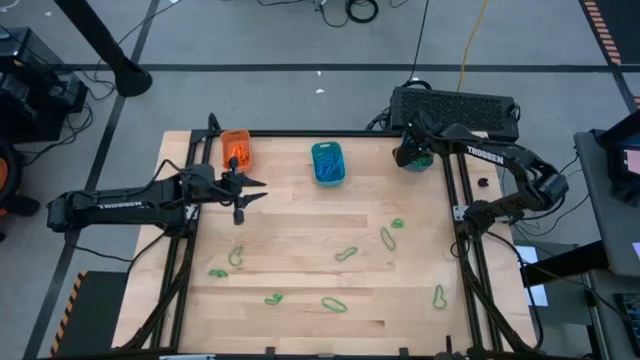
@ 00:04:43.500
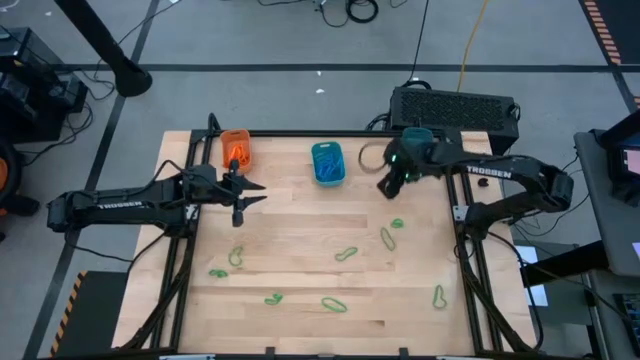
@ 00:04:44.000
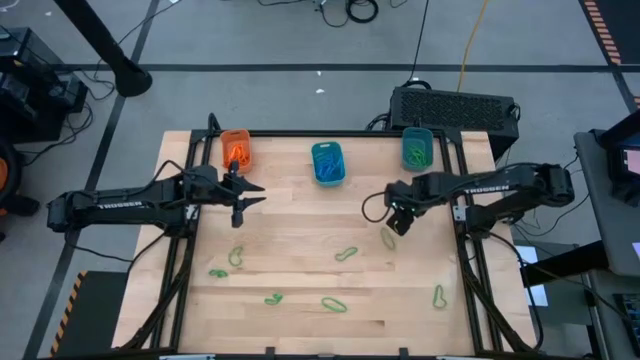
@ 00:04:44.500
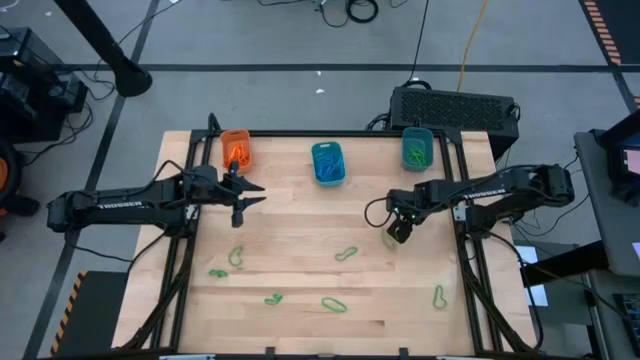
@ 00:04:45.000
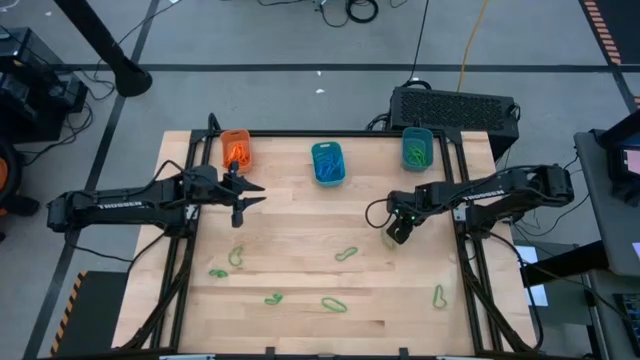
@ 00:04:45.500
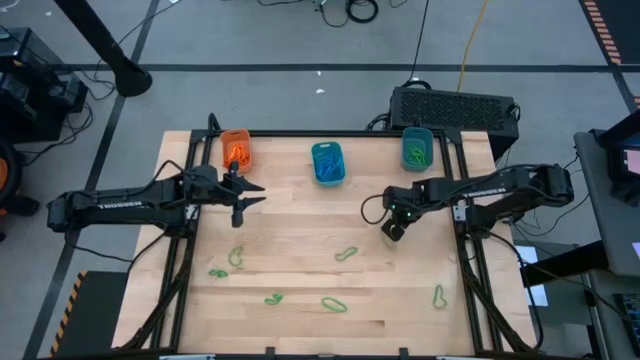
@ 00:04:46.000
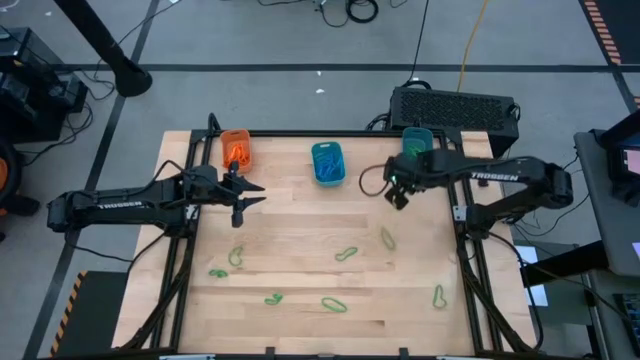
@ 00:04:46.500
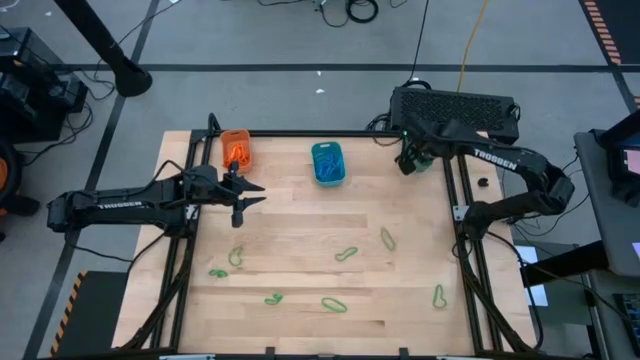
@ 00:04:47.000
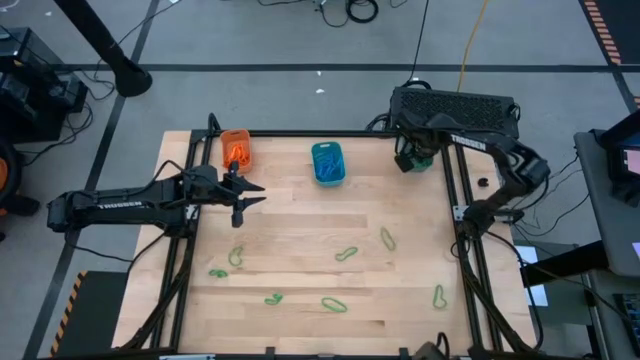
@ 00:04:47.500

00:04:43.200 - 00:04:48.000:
Task: Sort rubber bands into baskets
Put the green rubber band into the dark blue bin

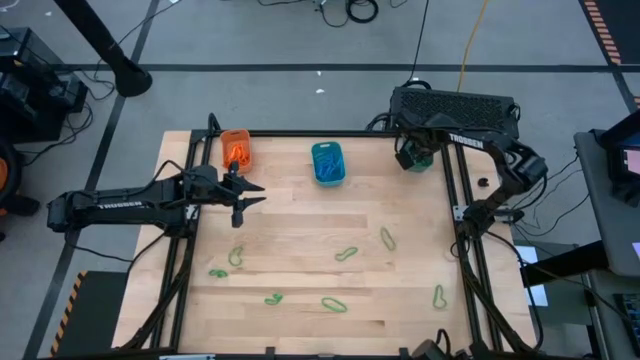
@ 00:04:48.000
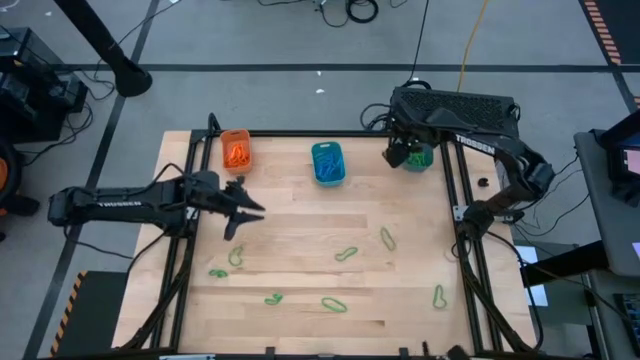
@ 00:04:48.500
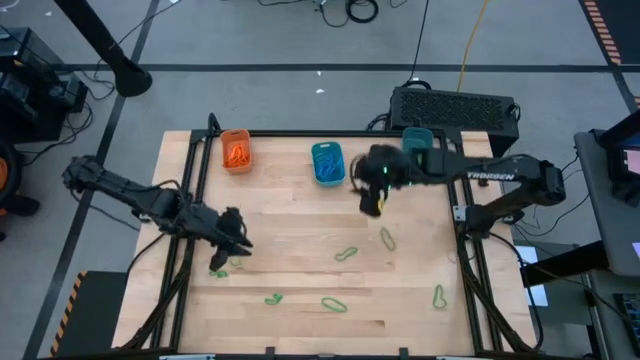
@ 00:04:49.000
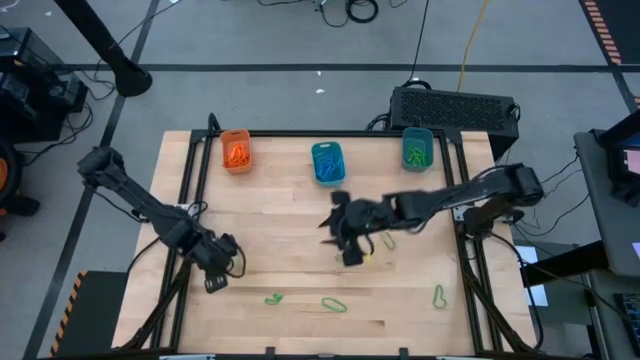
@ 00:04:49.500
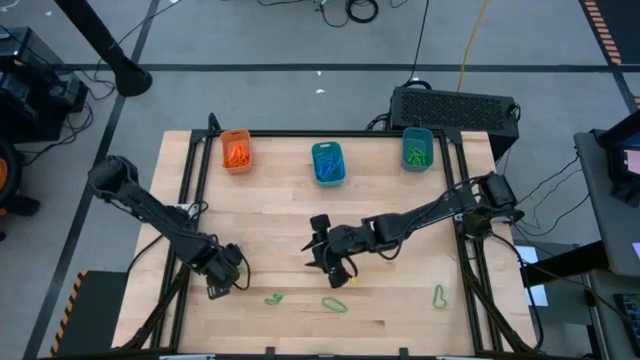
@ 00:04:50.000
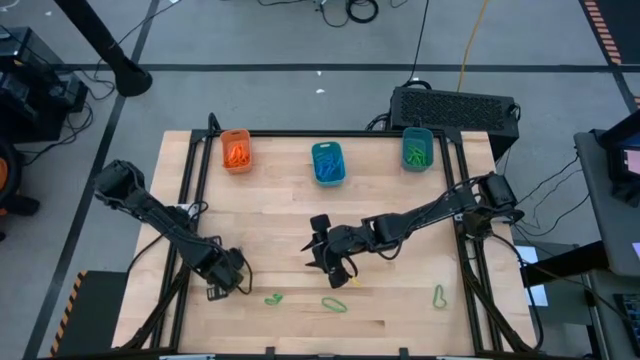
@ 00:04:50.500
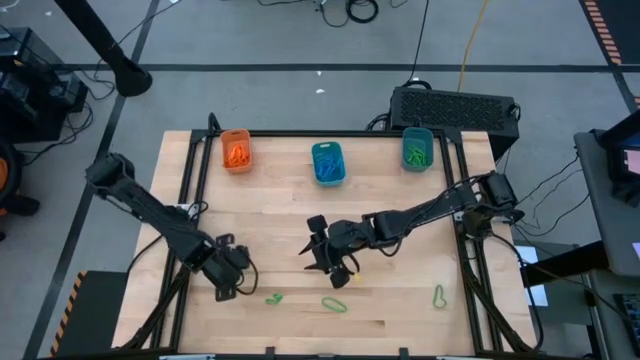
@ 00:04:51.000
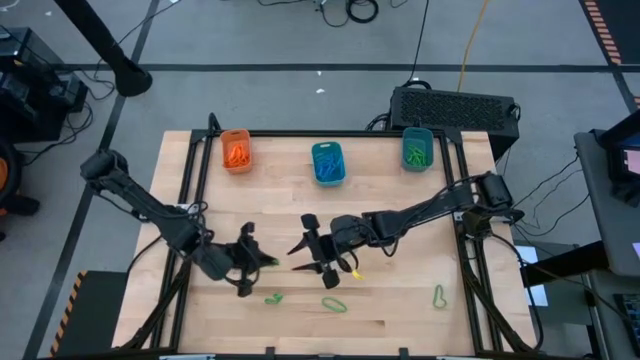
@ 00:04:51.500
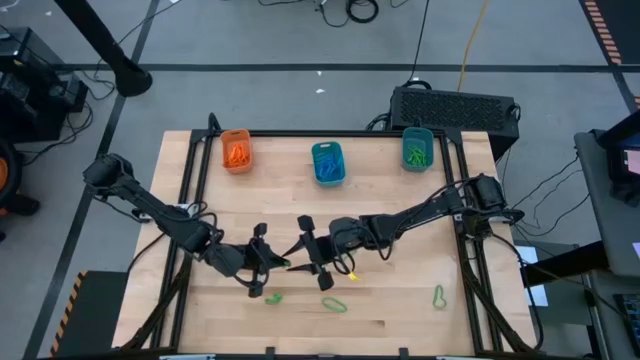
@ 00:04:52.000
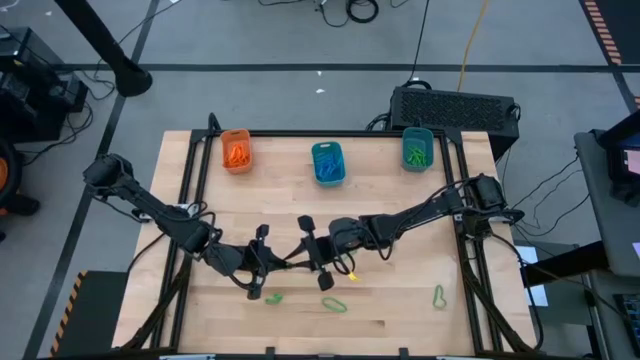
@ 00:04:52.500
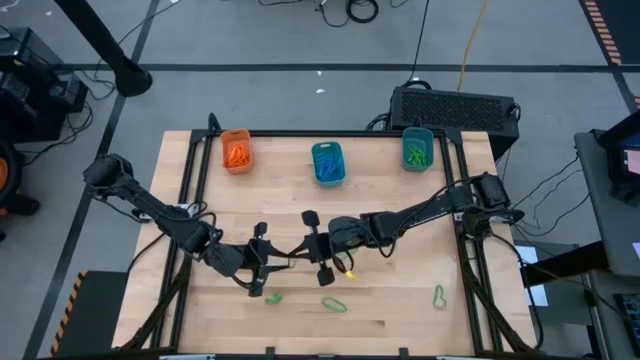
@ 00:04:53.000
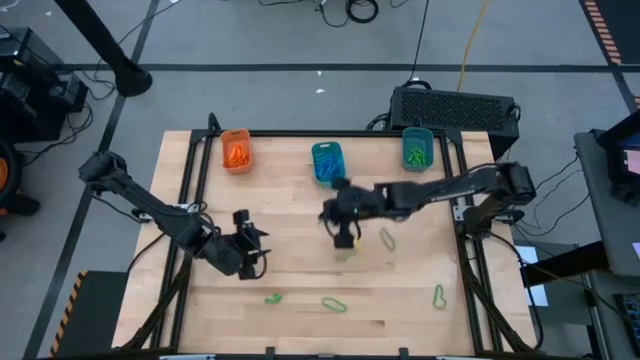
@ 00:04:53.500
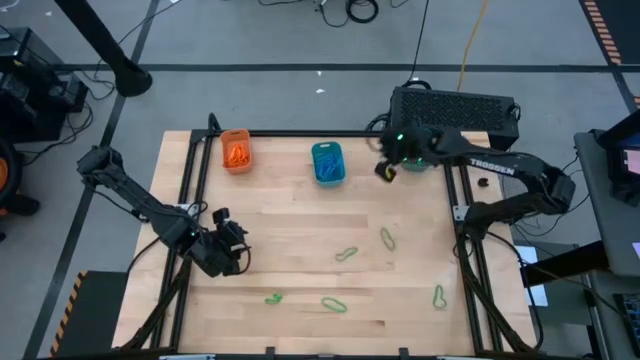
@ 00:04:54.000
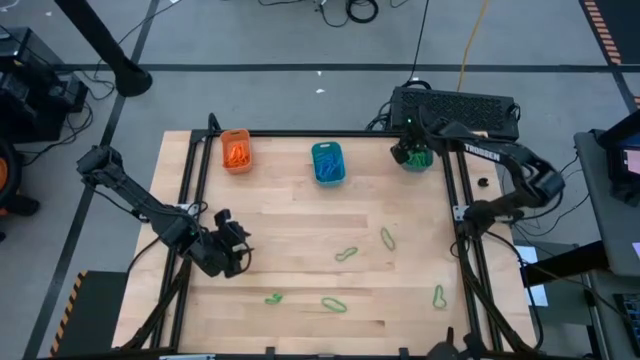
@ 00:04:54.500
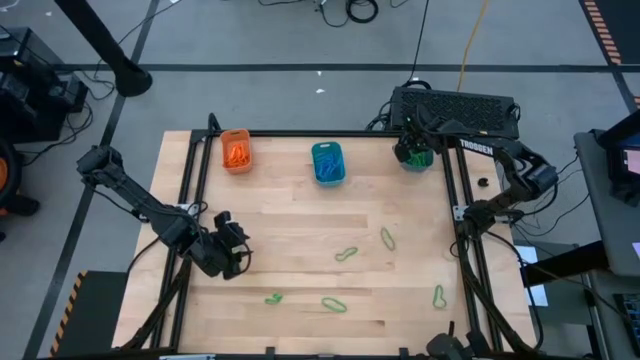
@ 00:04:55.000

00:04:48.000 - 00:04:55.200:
Put the green rubber band into the dark blue bin

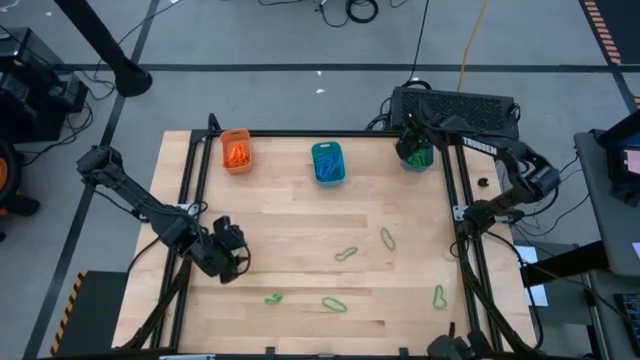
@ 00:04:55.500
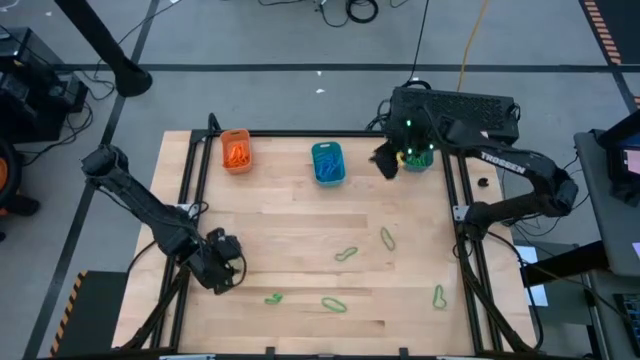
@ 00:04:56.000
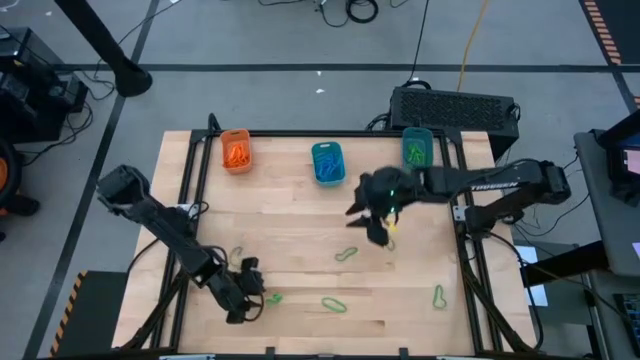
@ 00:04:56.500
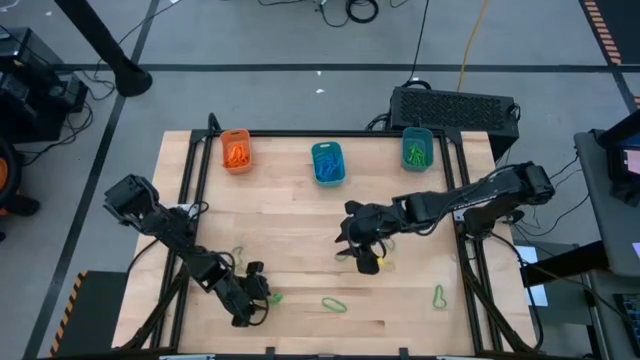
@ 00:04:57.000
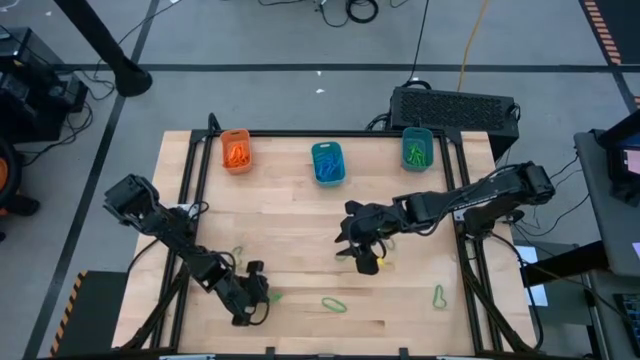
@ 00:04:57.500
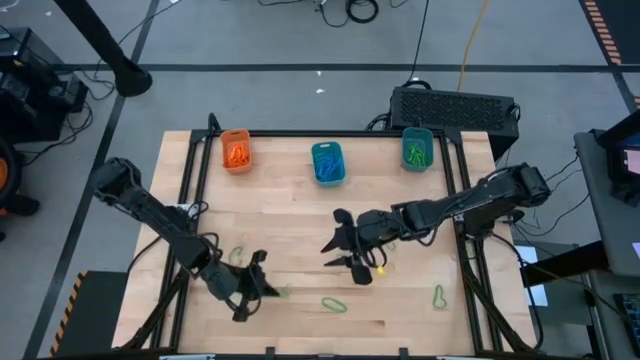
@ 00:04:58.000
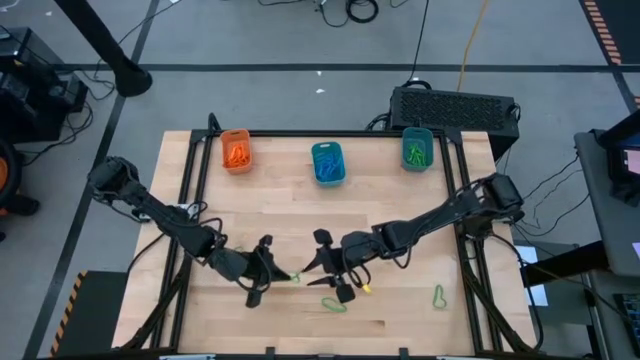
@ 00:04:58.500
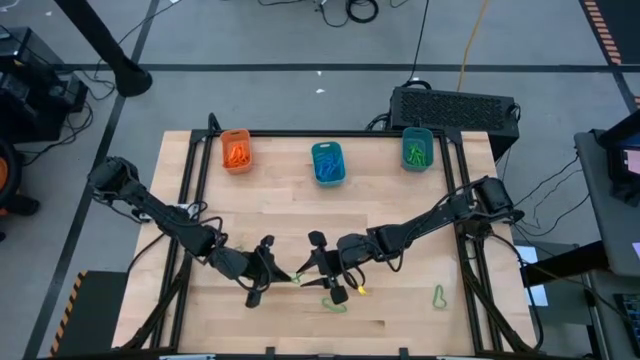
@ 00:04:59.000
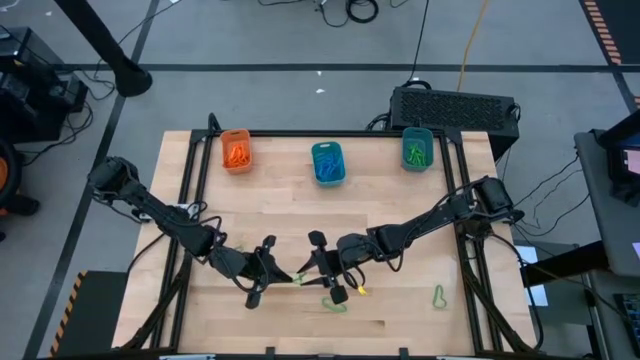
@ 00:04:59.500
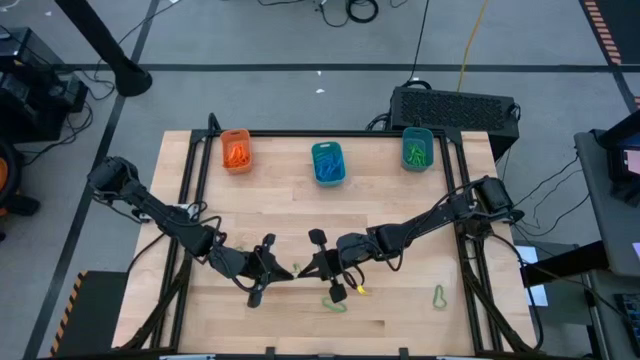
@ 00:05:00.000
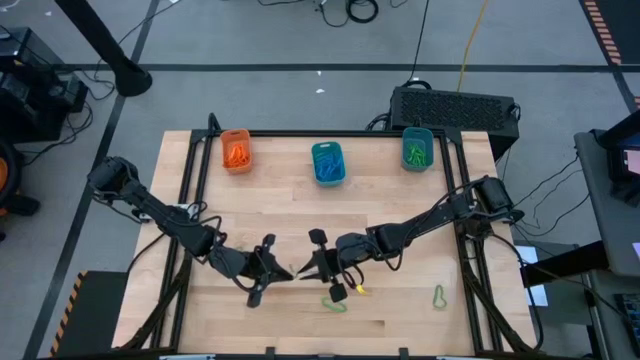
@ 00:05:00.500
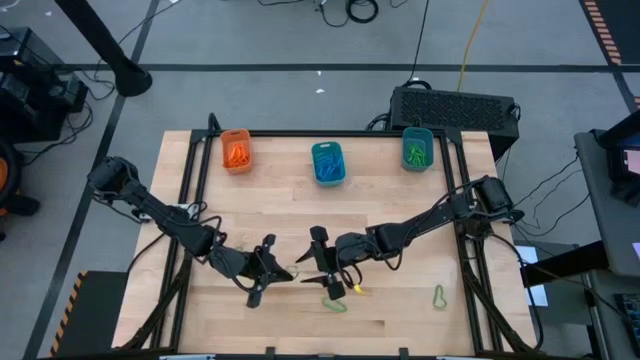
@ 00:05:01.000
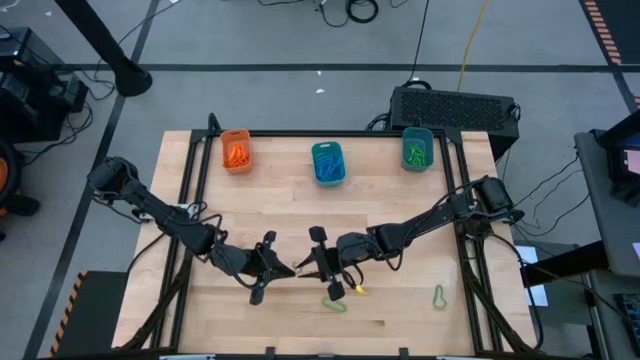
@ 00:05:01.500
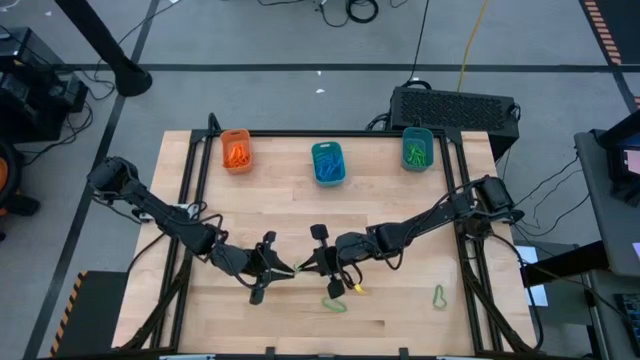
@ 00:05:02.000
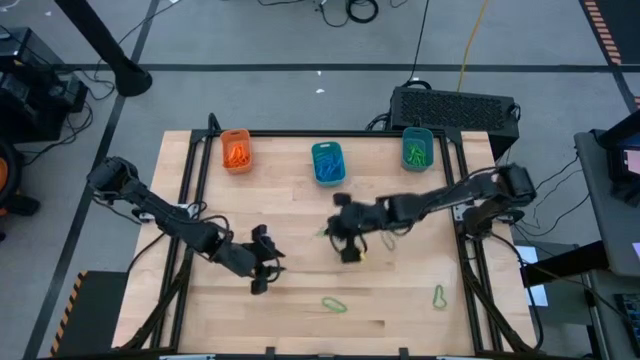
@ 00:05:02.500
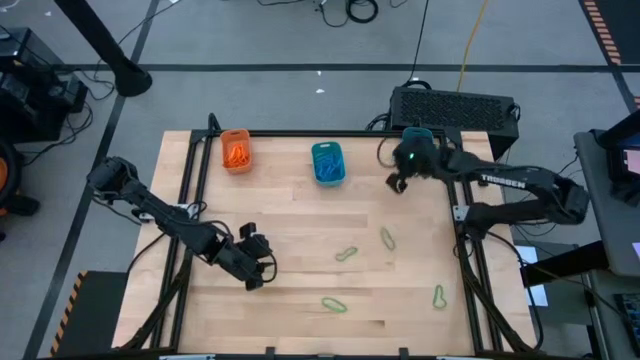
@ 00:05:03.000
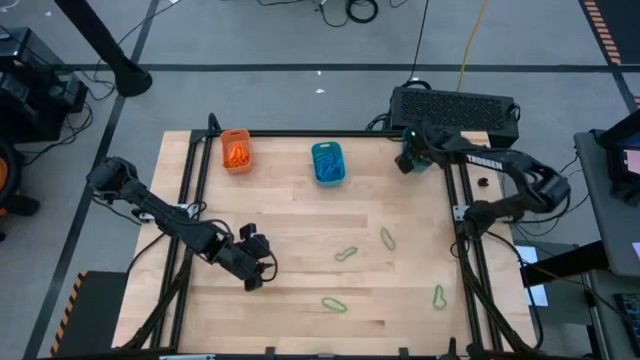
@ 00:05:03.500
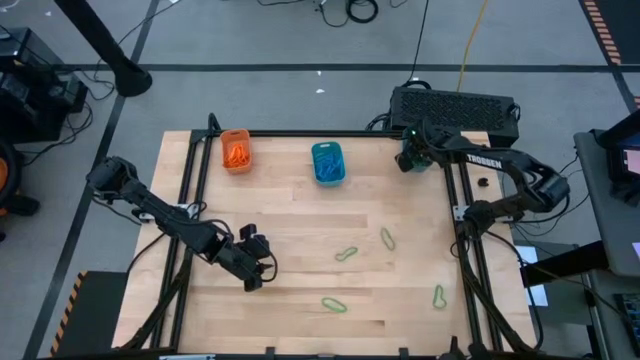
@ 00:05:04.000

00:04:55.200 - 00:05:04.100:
Put the green rubber band into the dark blue bin
